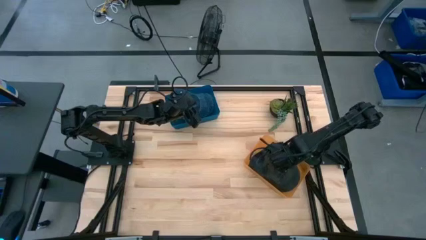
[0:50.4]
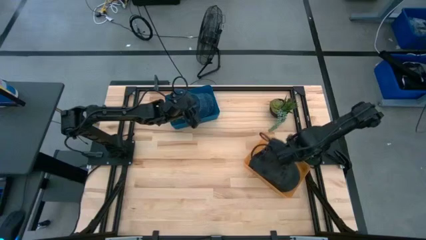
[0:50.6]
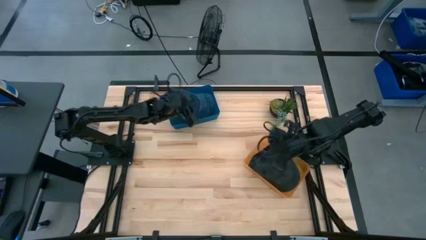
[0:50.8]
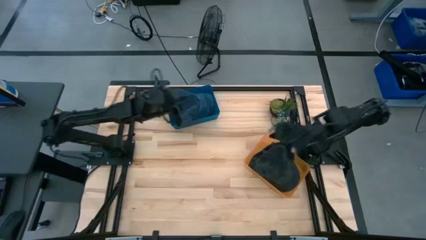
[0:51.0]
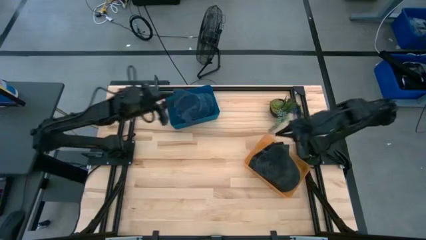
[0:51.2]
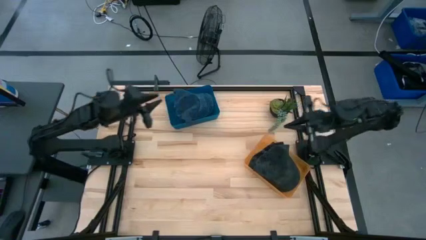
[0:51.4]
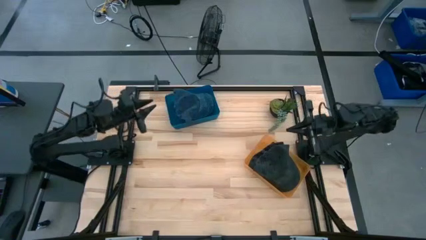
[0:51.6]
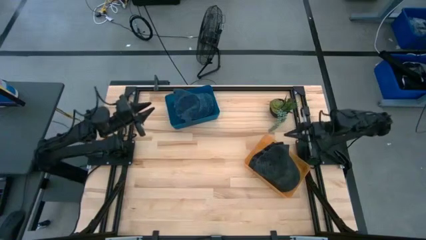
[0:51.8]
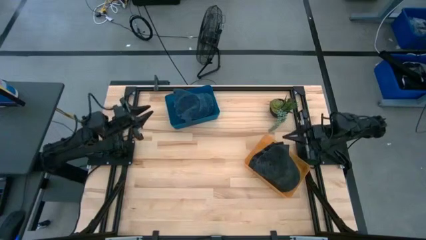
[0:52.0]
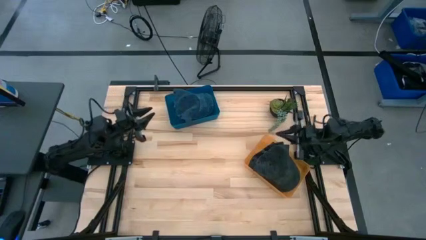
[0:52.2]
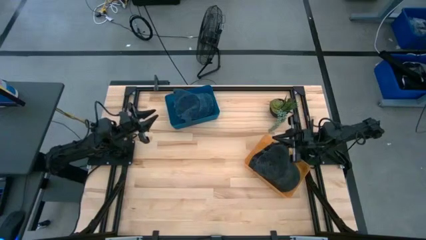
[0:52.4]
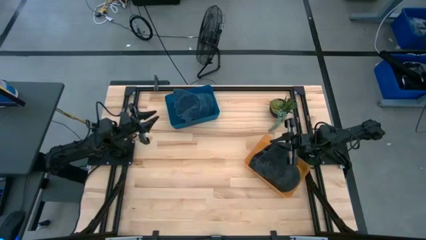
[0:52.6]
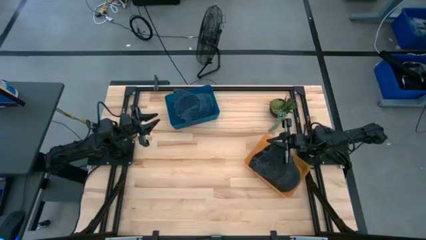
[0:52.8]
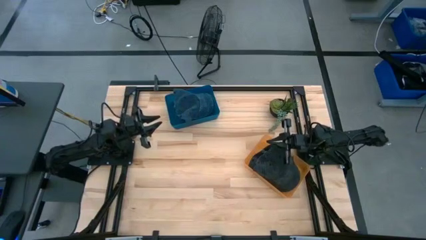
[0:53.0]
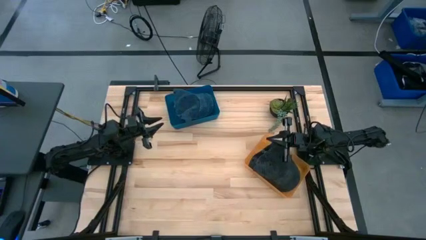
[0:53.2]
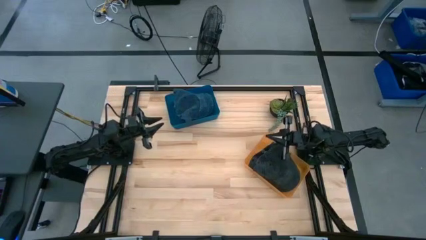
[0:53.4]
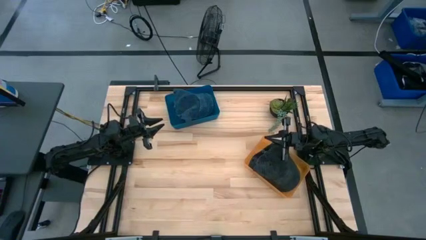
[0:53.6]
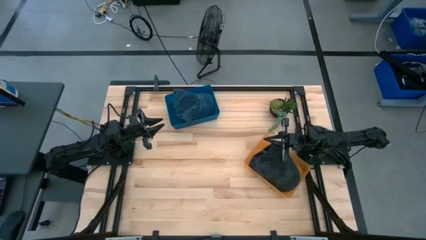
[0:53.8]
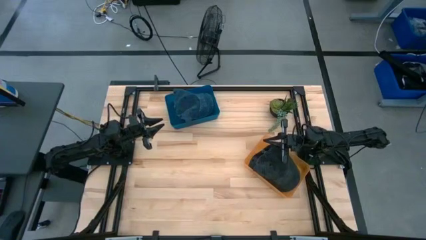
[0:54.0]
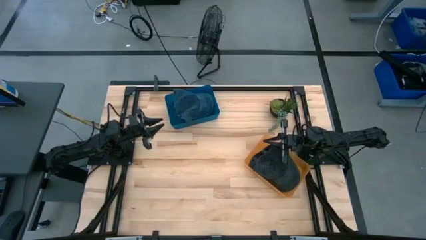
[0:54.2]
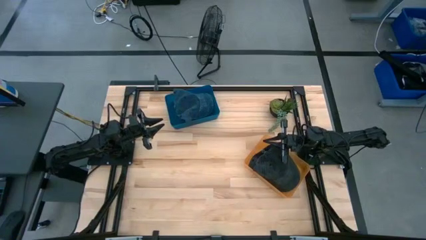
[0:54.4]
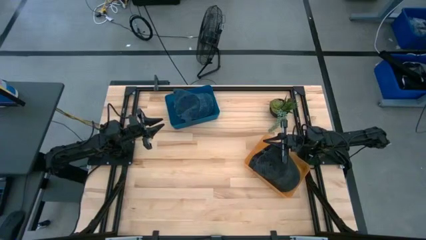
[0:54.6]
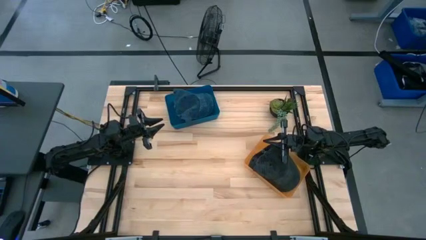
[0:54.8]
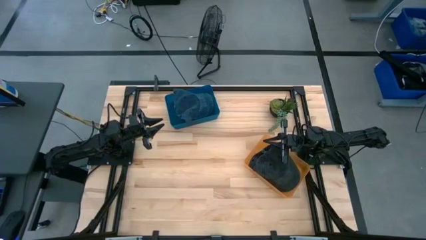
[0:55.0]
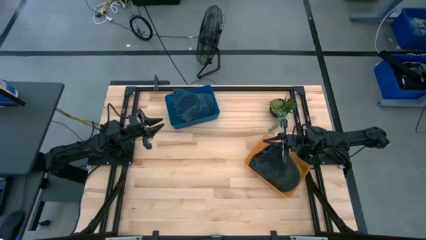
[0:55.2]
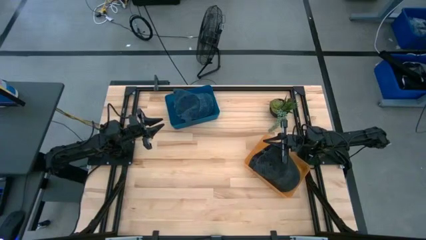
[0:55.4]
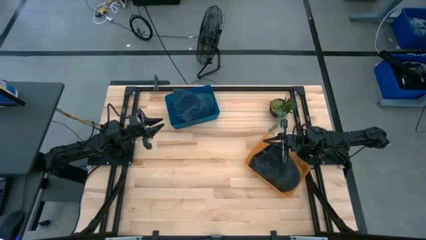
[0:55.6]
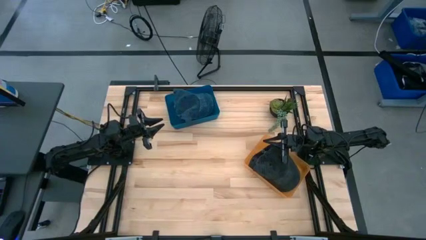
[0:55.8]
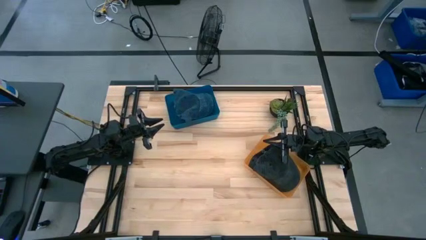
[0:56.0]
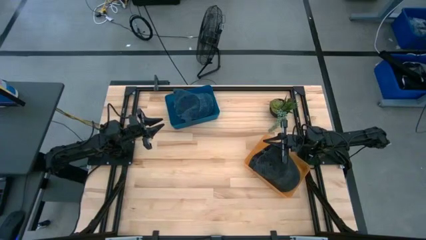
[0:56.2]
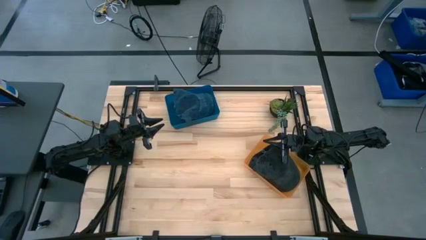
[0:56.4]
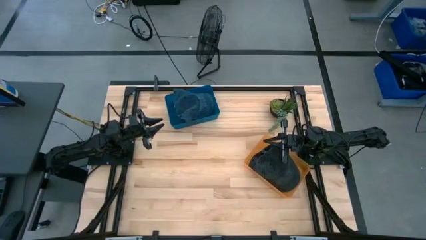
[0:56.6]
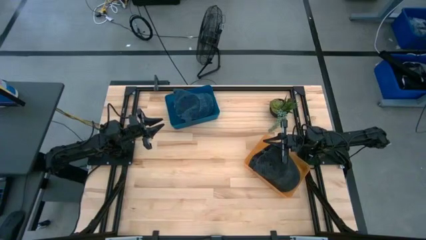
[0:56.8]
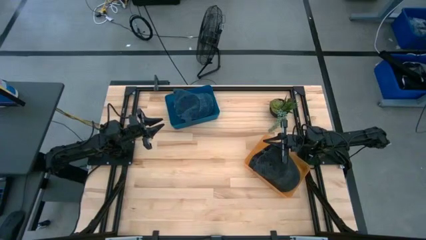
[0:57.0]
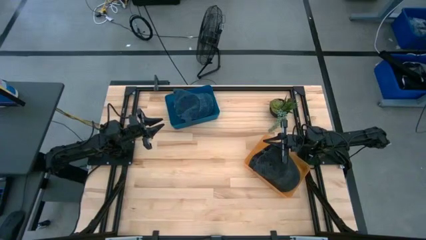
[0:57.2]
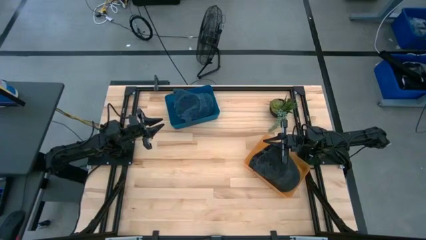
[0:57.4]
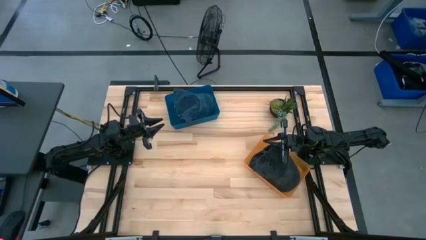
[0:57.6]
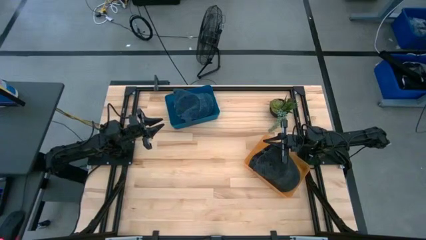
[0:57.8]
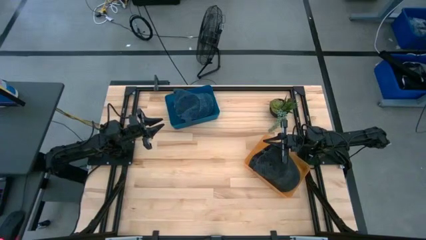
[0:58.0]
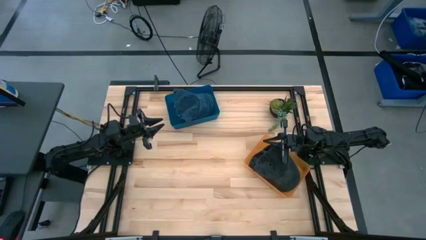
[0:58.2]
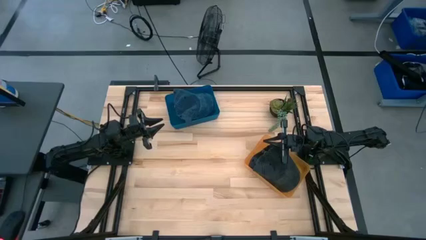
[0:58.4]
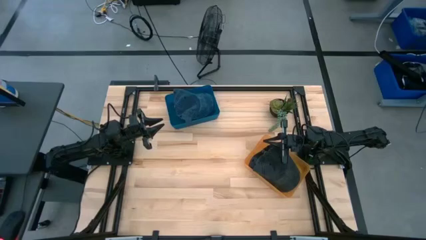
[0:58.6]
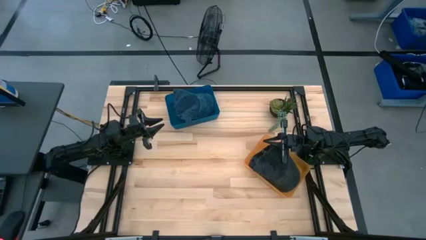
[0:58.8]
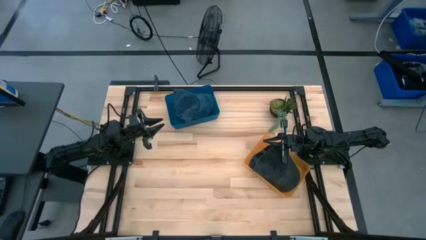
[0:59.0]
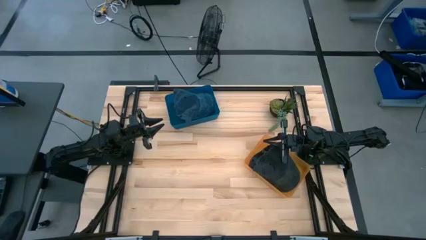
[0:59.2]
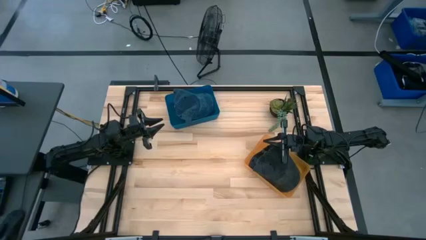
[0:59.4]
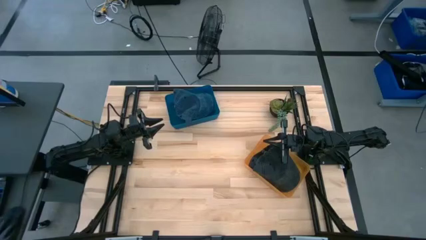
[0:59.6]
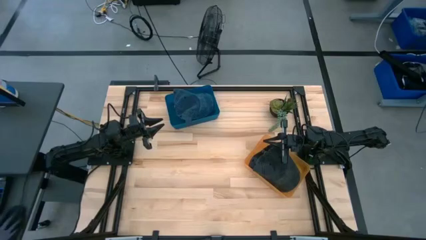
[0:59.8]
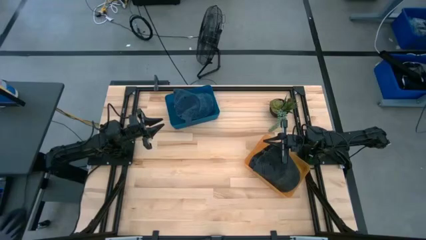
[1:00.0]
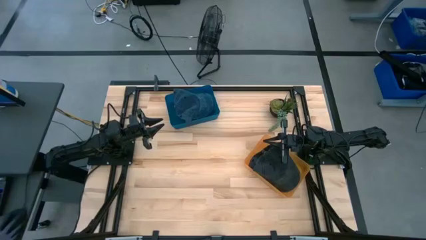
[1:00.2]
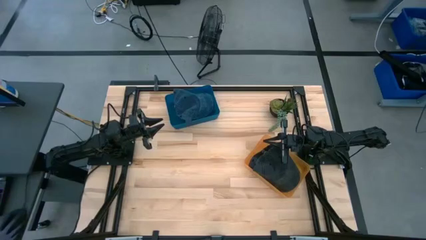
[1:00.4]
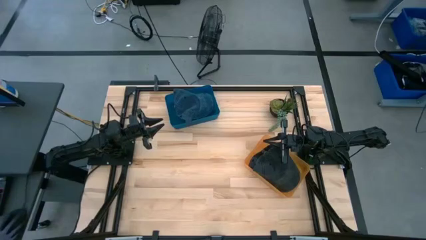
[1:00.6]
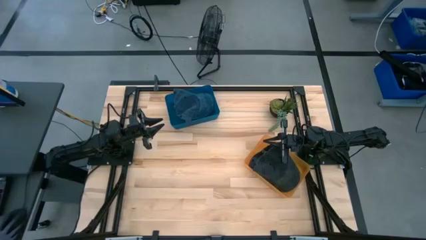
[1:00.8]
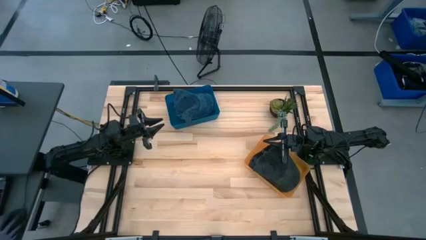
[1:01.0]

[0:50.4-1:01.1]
Task: Pick & Place hat
Return to Home Position

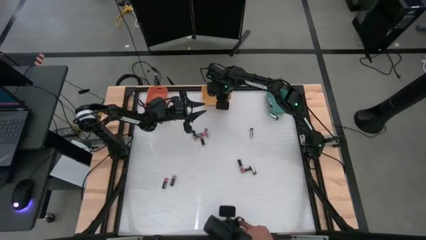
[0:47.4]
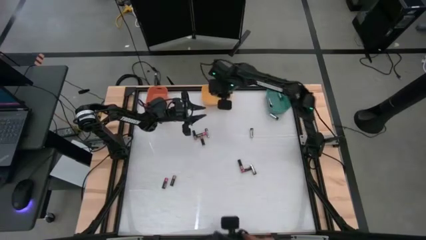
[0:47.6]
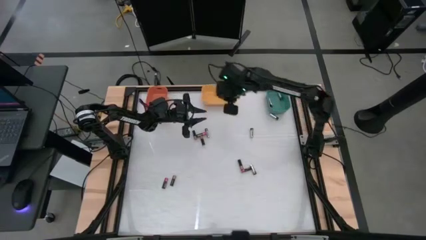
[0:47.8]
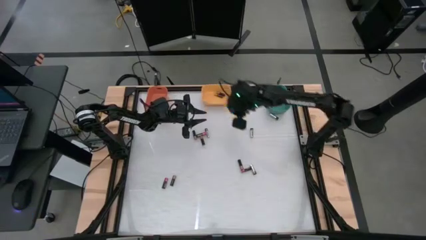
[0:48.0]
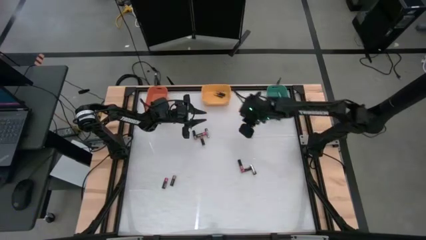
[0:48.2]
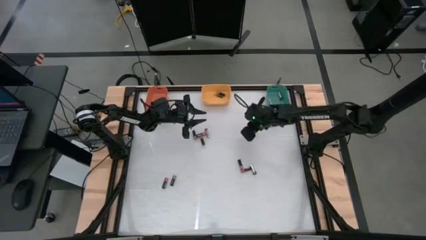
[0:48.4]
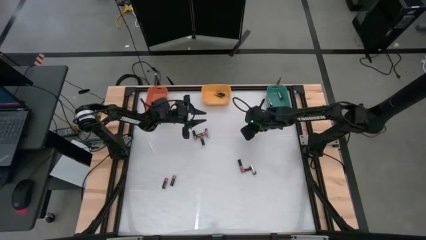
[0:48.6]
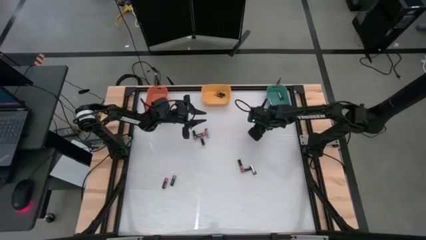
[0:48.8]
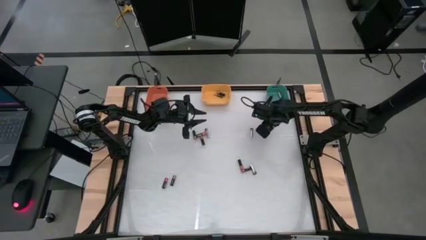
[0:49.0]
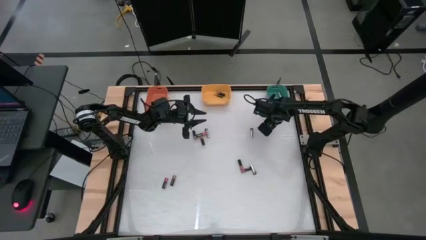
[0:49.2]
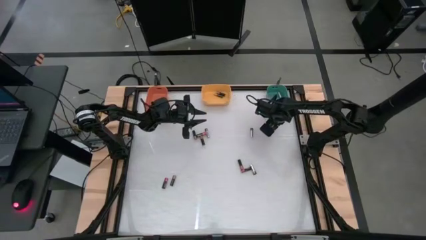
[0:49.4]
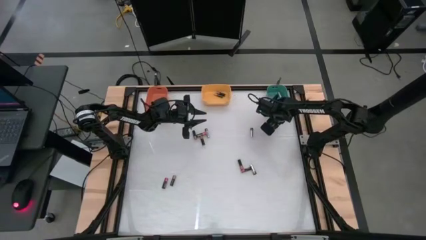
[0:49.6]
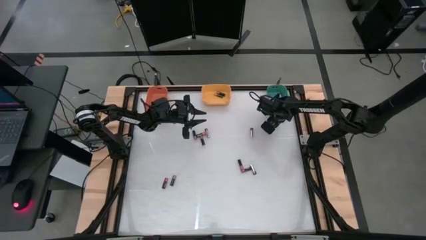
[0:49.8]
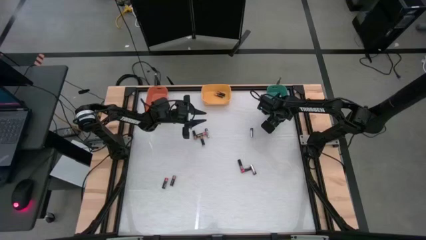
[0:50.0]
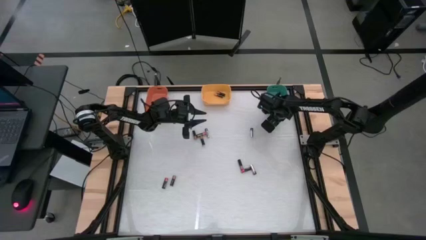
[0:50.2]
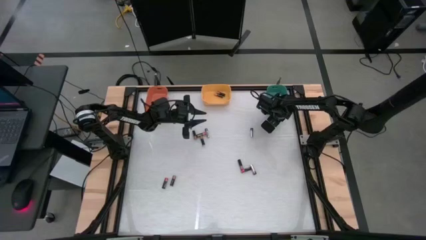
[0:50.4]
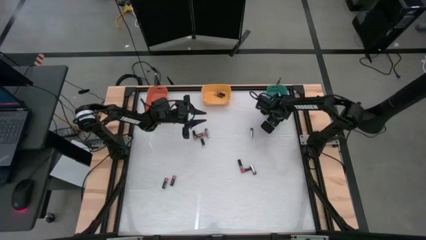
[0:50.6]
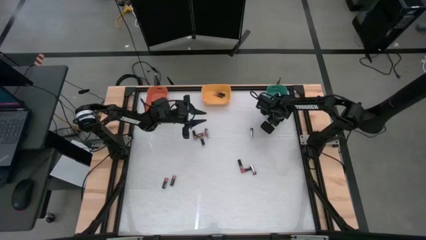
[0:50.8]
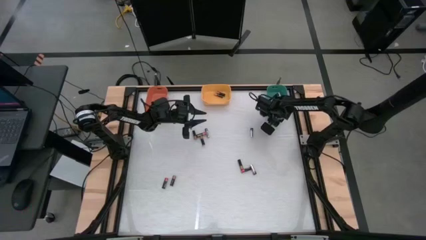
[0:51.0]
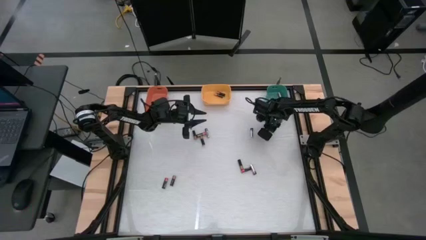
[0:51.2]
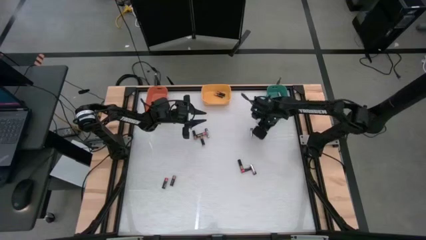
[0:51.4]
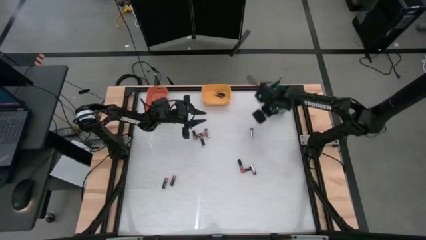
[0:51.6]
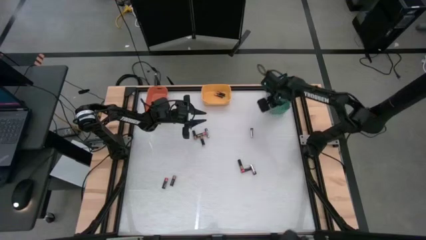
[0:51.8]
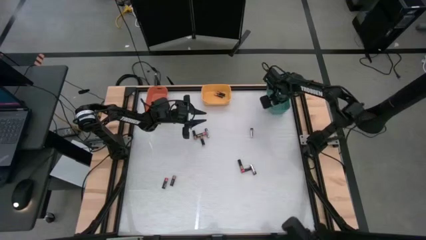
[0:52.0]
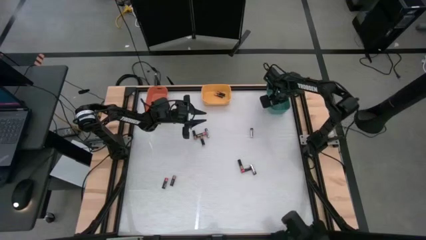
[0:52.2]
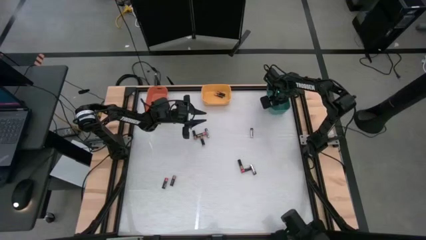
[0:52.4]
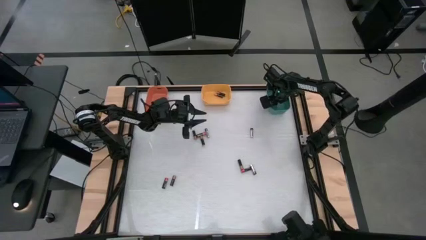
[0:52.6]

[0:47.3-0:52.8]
Task: Sort batteries
Put the black battery into the green bin
